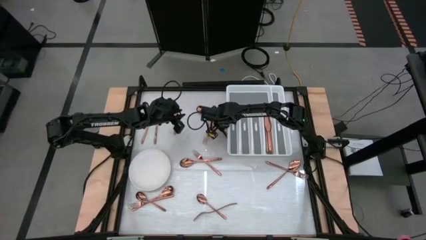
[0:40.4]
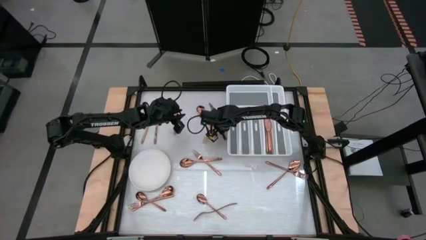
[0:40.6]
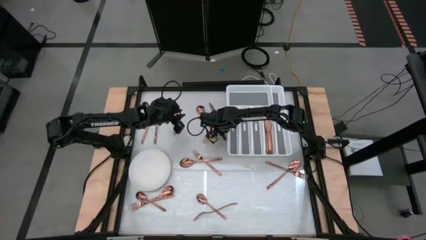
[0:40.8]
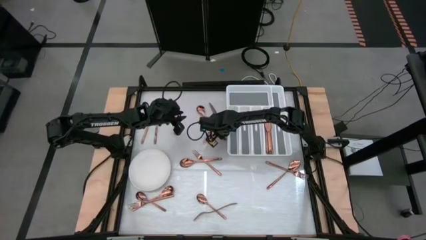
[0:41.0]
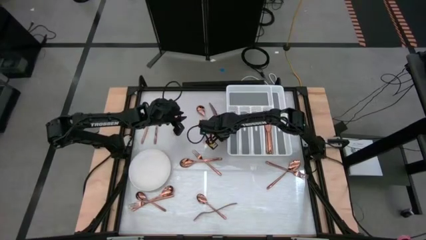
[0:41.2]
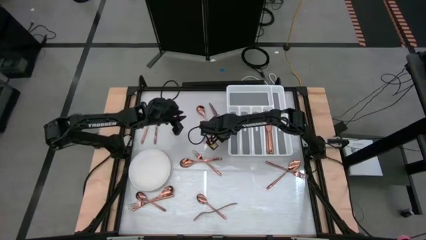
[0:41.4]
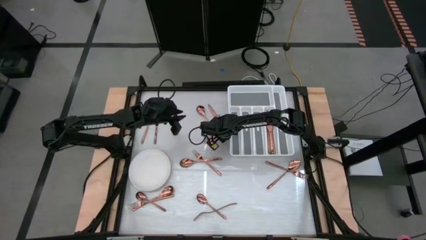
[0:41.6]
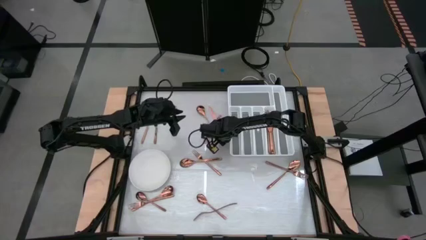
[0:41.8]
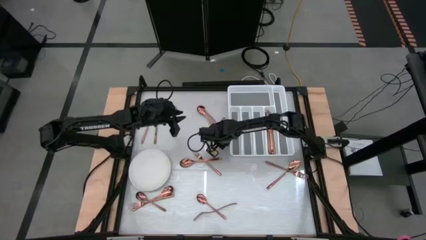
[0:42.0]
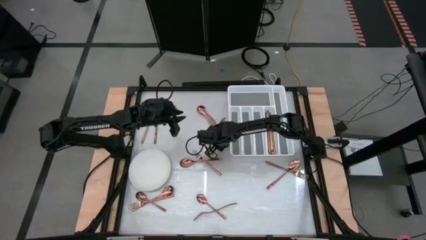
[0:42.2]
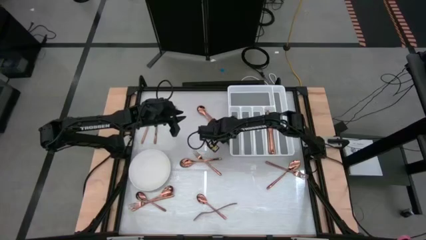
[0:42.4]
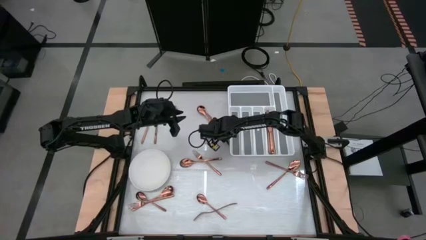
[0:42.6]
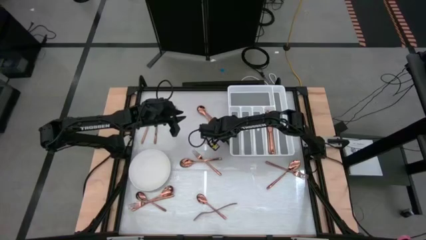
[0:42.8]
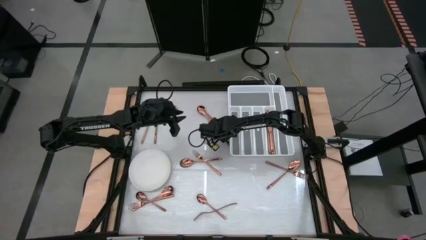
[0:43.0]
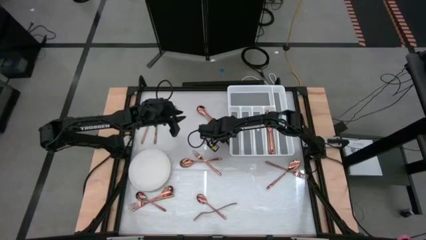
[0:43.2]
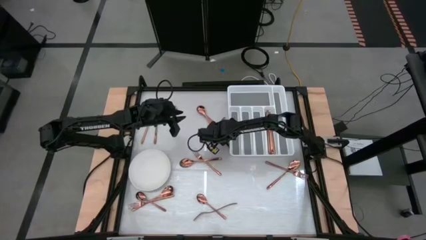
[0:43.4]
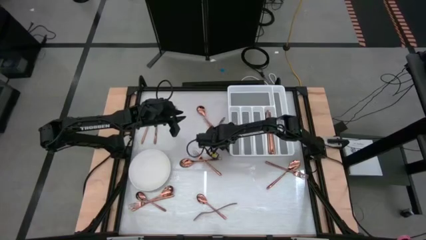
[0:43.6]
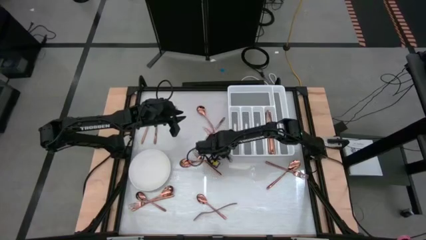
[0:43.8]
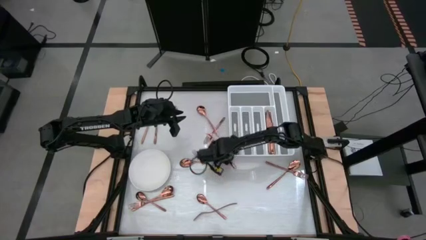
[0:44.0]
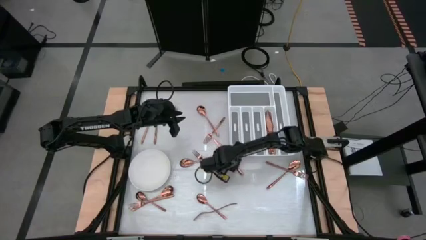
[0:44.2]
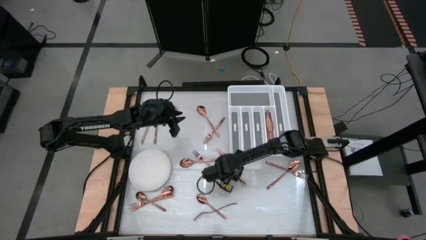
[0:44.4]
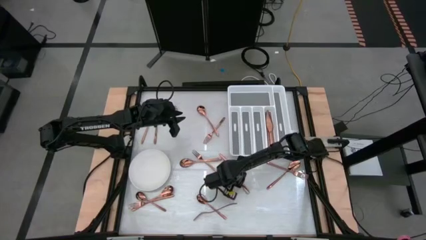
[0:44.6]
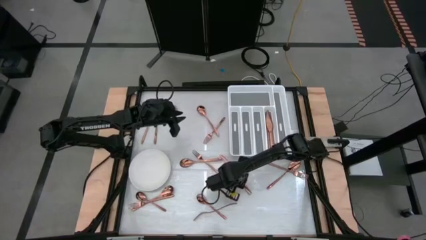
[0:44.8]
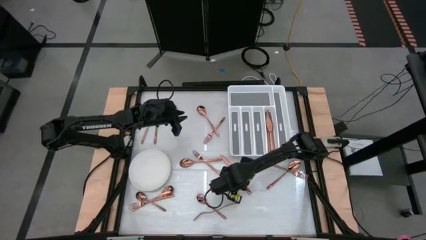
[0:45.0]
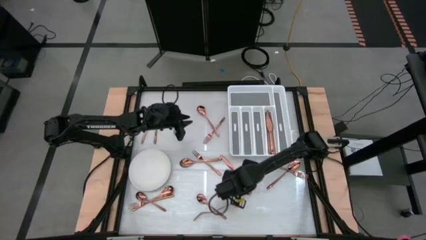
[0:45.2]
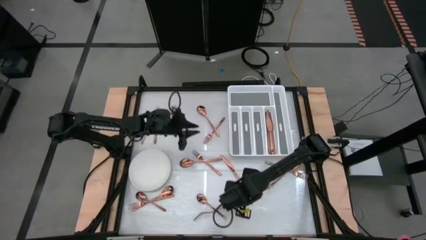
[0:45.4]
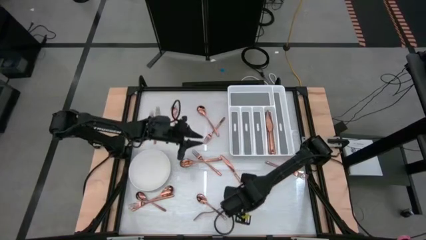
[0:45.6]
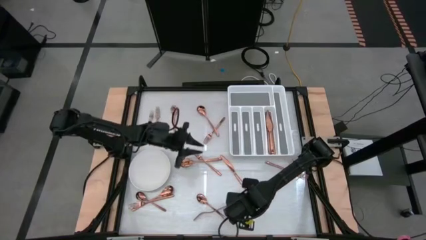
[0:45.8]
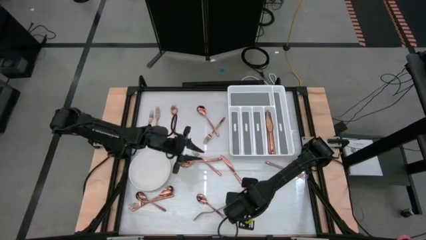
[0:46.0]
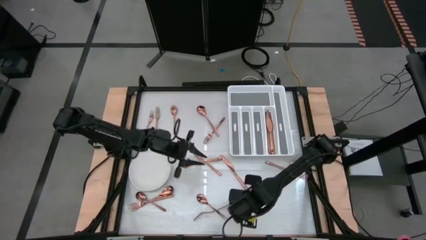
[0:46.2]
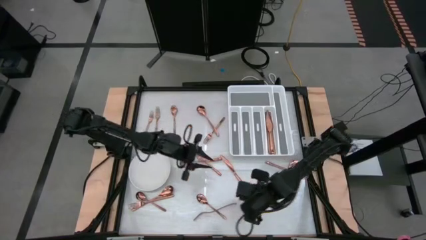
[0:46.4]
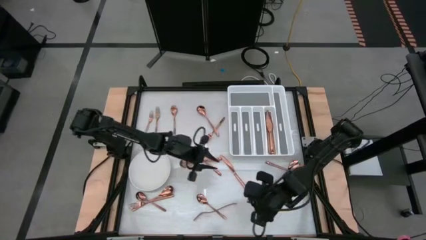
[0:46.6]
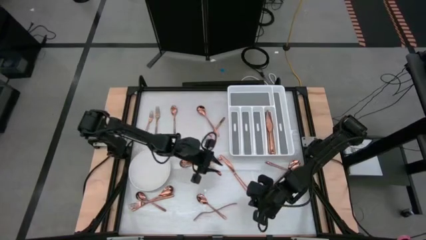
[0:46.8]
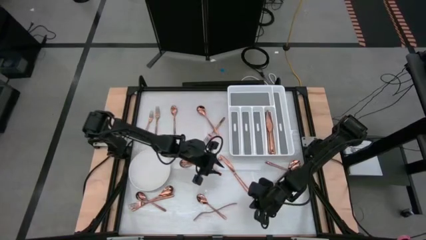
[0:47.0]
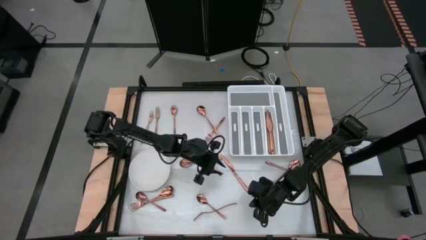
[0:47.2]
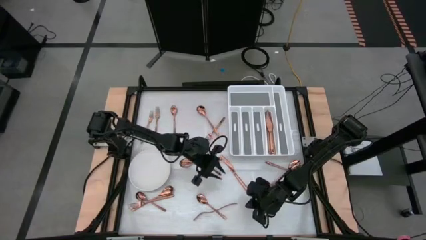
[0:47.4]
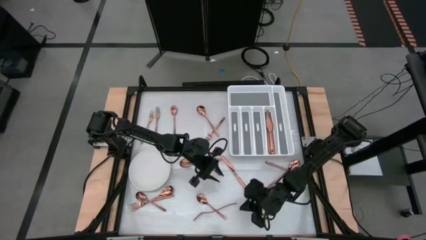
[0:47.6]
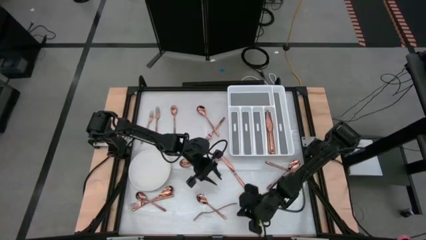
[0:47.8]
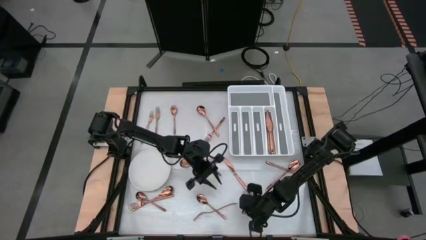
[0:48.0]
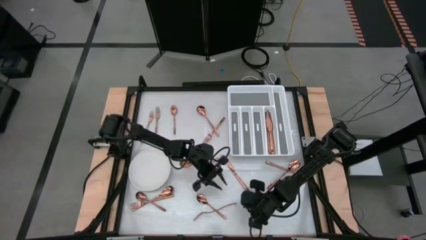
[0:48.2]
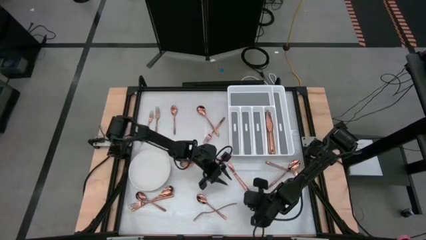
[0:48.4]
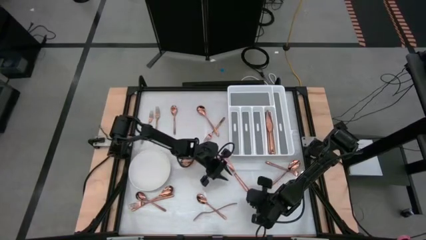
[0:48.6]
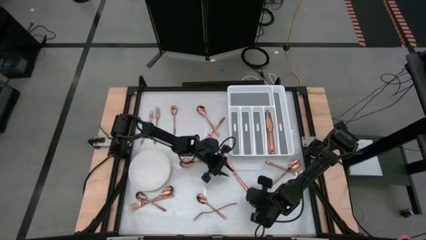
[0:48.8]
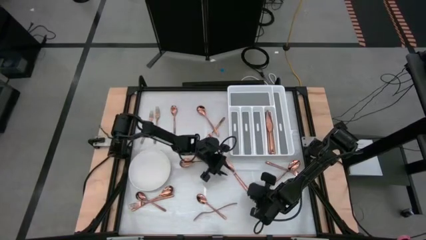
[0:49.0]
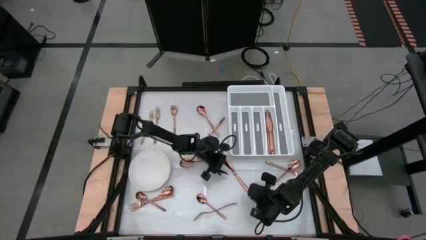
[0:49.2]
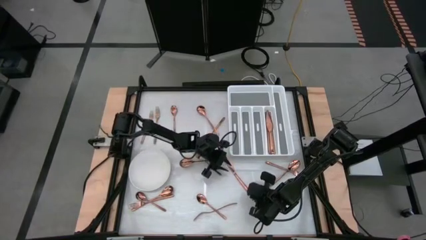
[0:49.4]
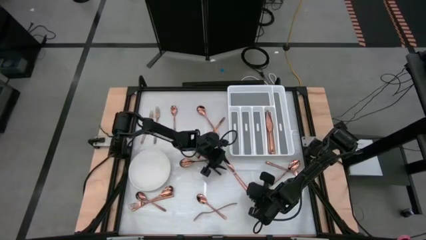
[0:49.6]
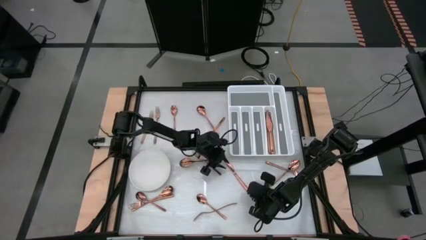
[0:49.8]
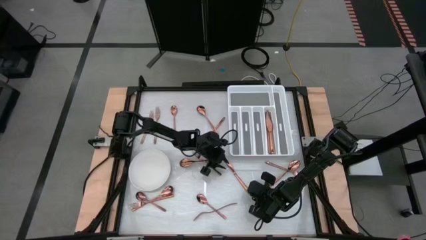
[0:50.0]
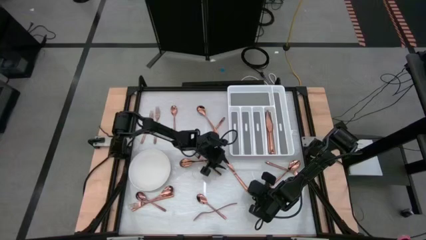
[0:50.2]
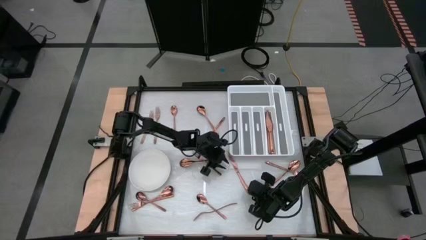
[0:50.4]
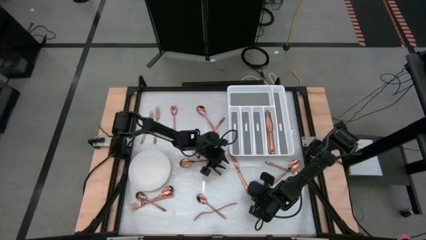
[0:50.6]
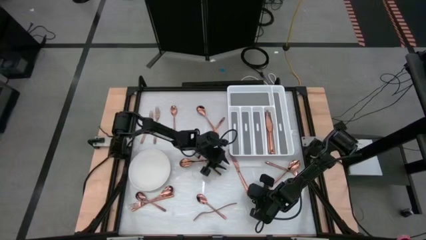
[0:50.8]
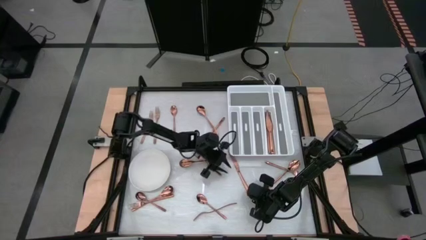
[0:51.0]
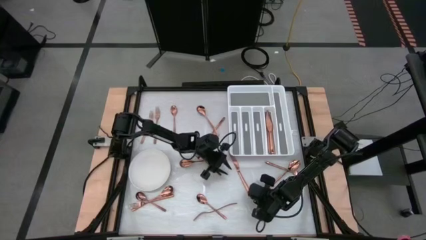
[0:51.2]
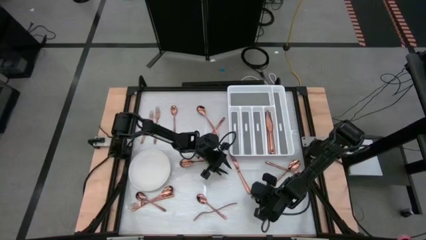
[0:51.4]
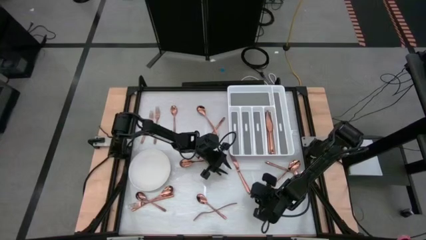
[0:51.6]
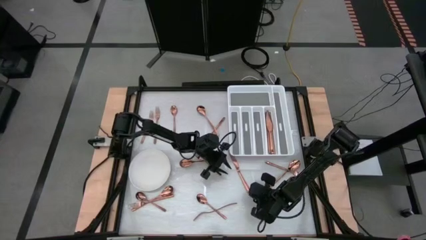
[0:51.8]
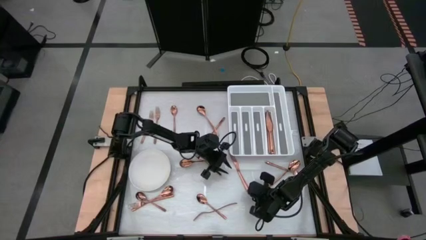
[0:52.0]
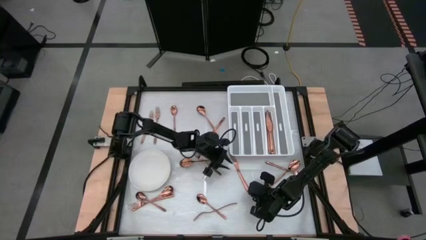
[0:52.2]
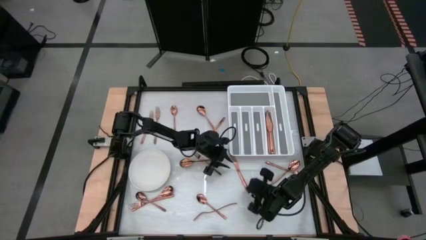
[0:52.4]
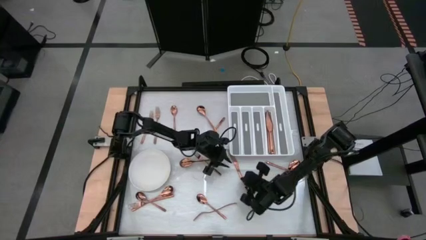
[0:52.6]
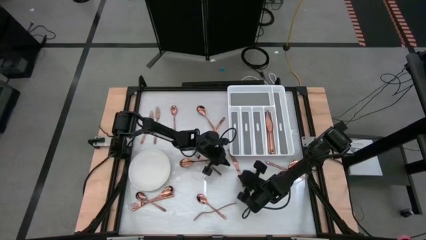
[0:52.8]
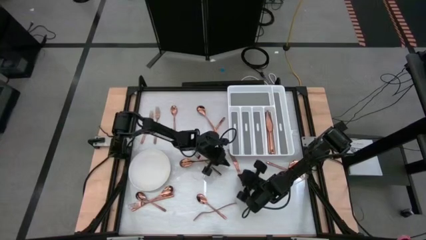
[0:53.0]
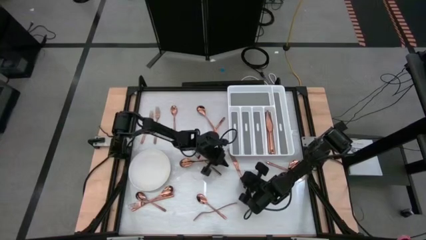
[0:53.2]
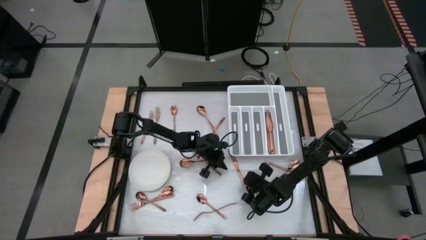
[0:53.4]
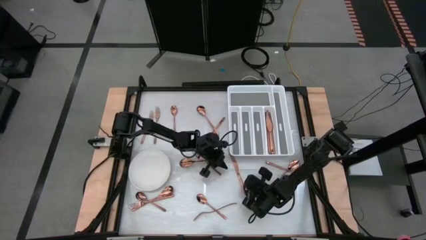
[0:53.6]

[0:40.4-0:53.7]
Task: Sort silverware
Put the bronze knife into the silverware tray
